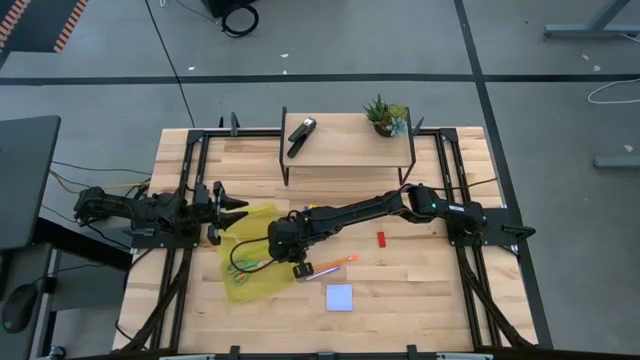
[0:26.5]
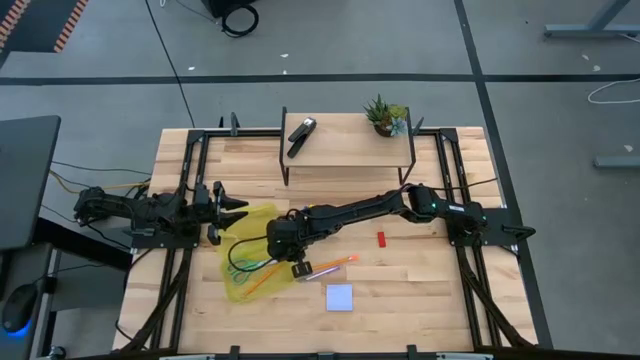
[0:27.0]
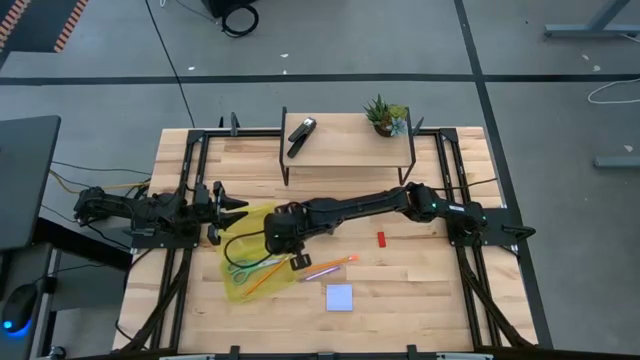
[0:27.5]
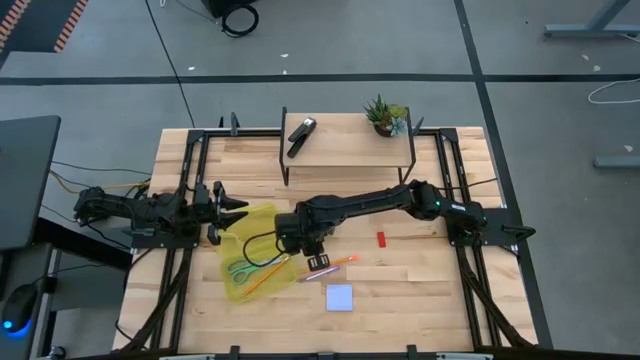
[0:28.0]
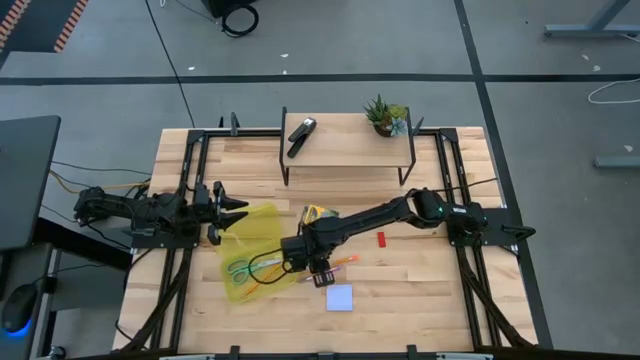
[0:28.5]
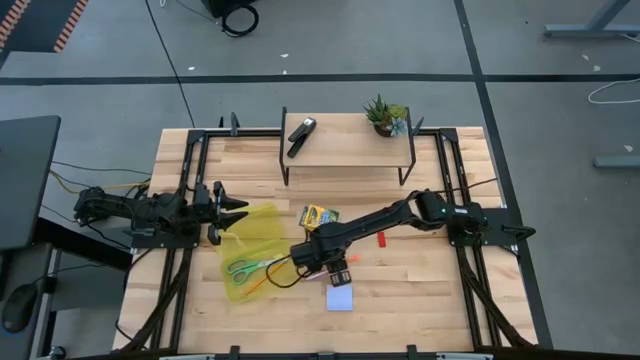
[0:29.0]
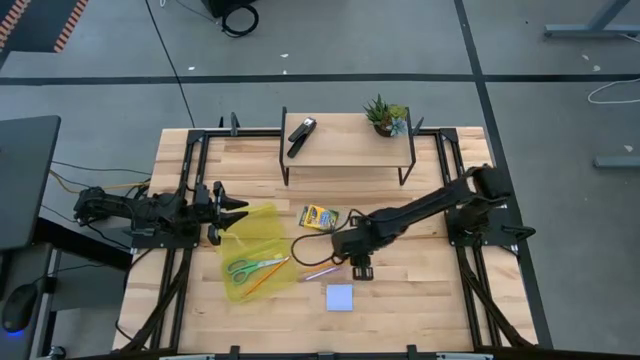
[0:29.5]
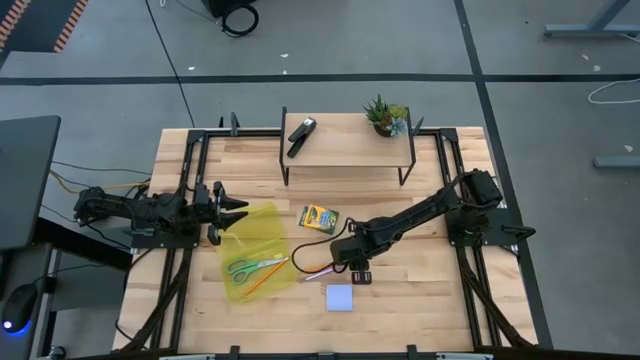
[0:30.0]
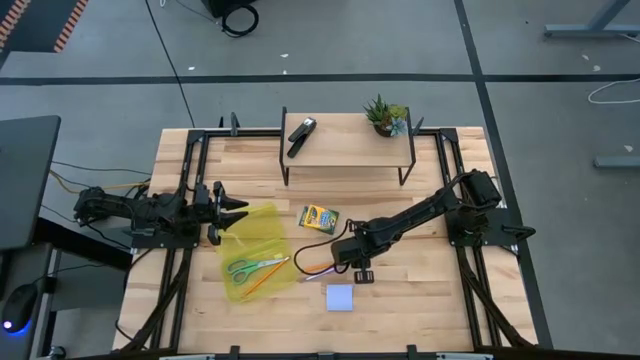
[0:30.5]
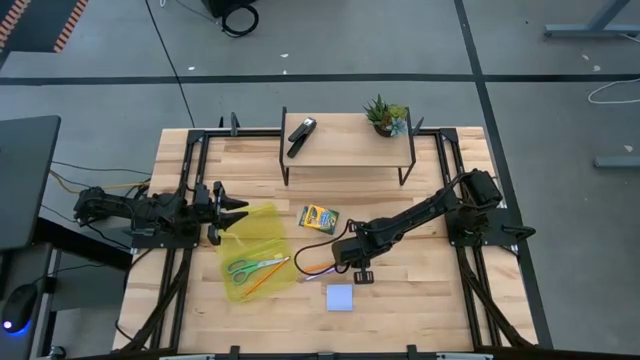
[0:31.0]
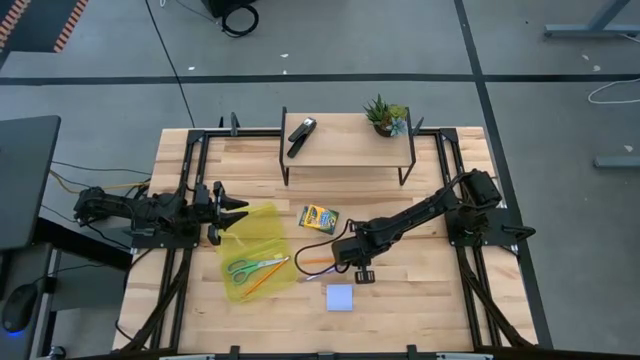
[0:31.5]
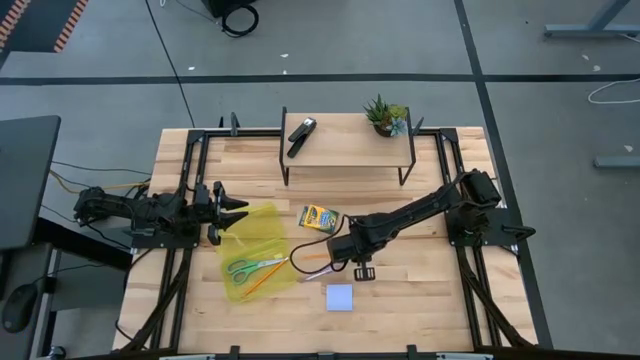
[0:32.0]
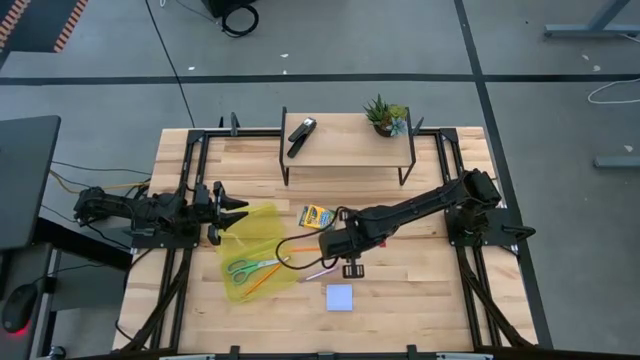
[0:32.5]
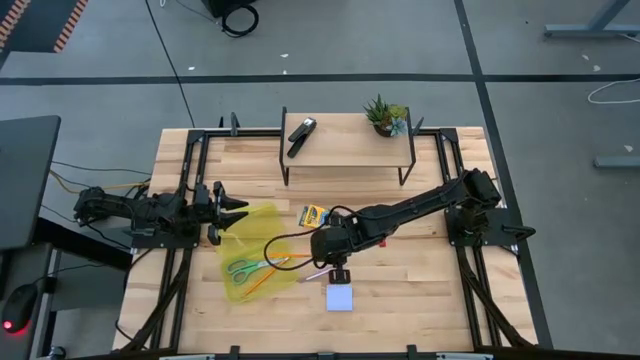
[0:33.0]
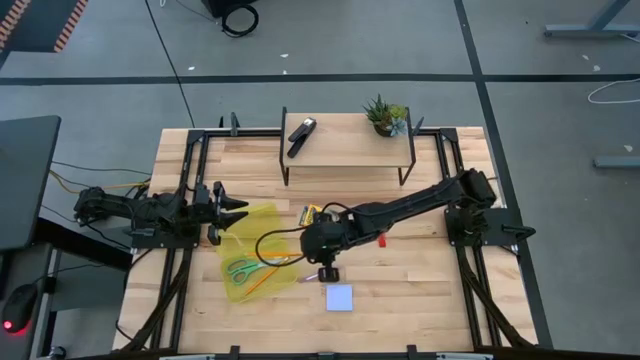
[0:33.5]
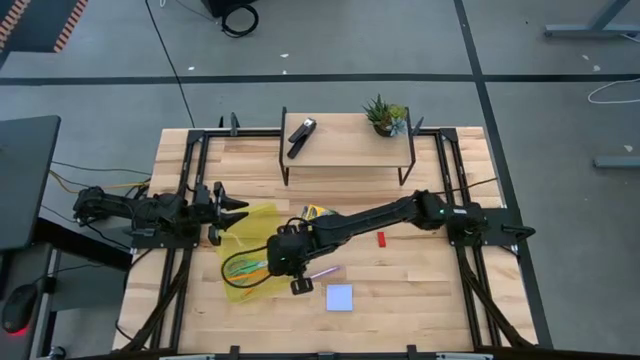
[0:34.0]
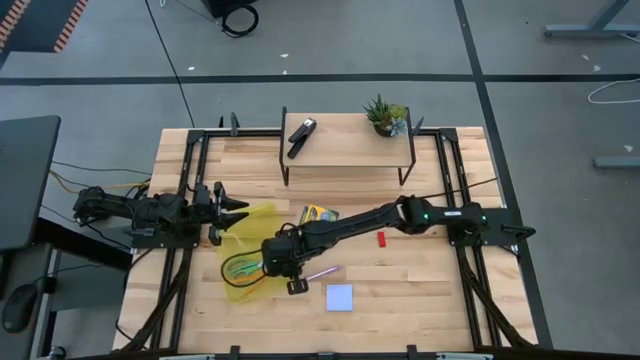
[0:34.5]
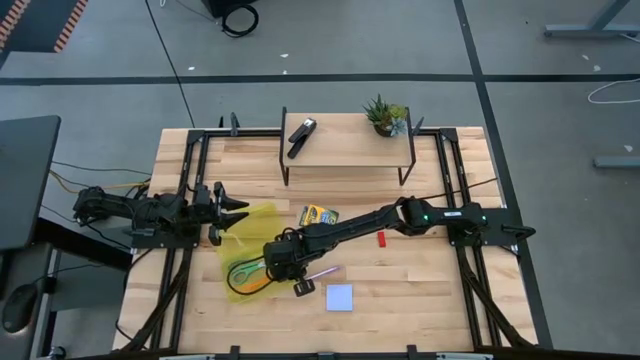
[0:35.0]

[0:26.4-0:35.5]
Task: Pack school essentials
Put the orange pencil into the yellow supply box

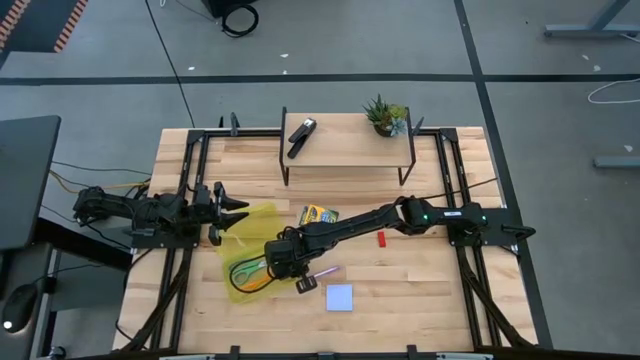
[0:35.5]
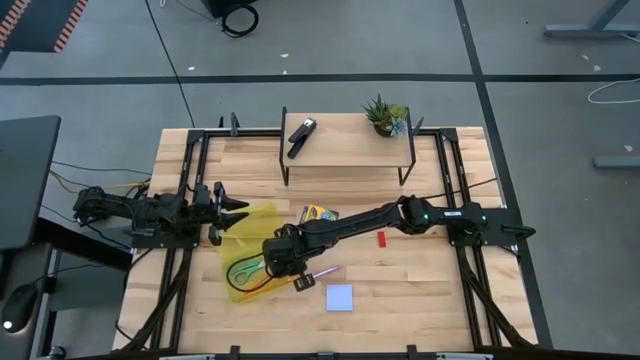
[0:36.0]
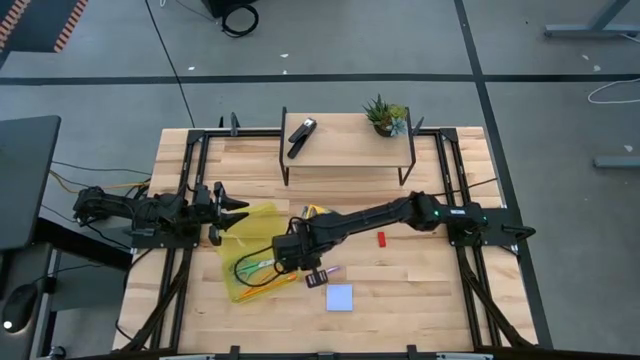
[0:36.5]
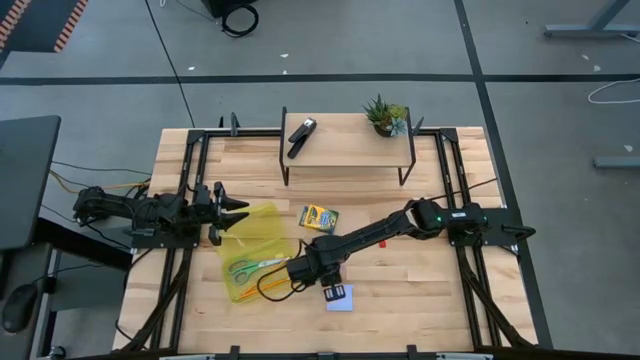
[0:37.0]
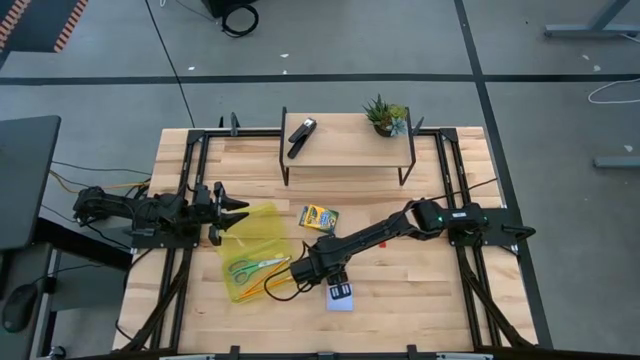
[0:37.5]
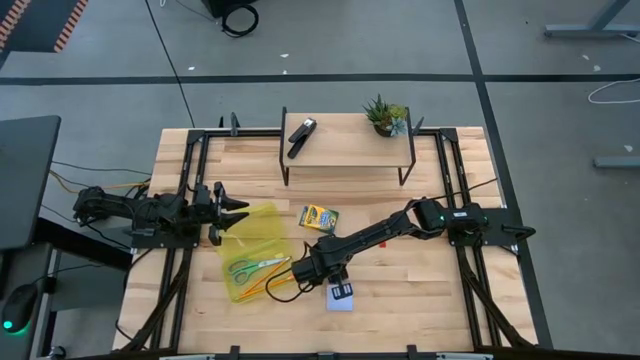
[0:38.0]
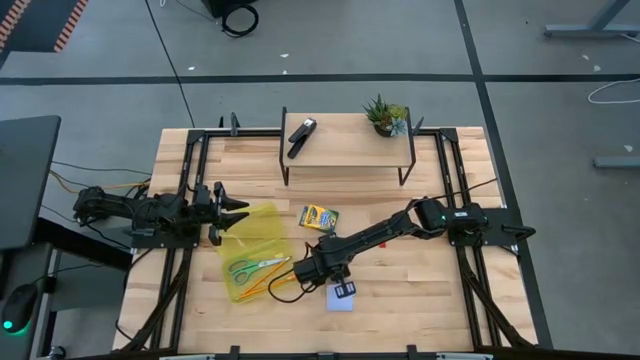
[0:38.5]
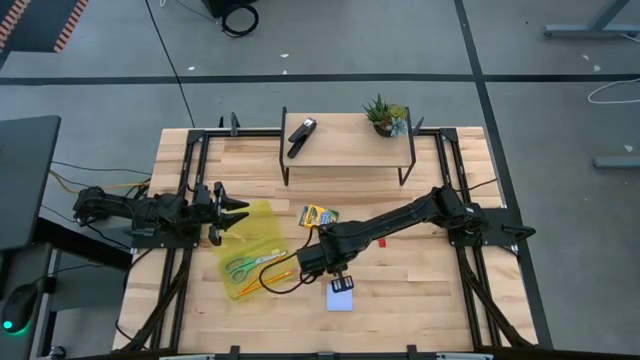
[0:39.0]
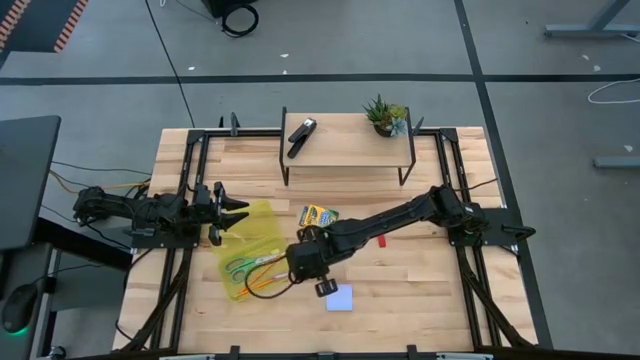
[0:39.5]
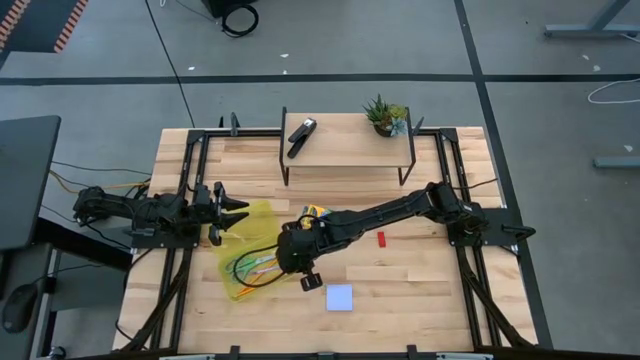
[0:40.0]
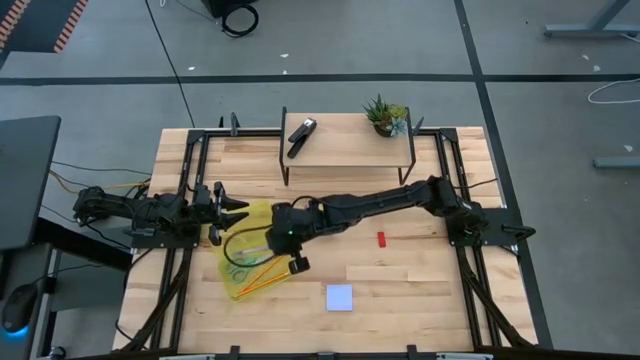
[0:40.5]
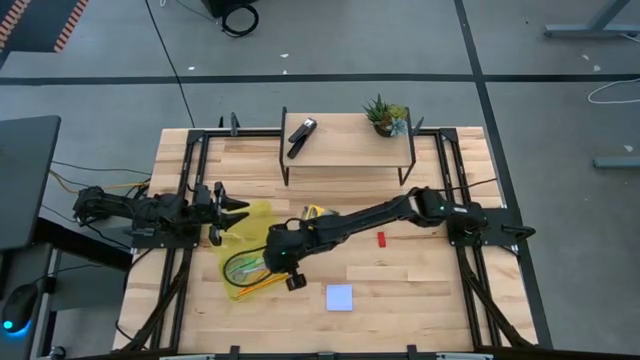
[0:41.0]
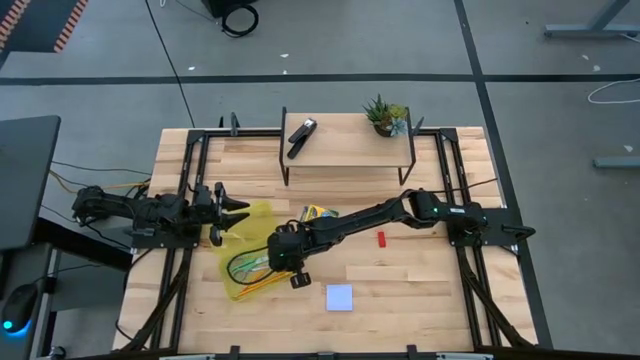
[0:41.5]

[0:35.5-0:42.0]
Put the purple pen into the yellow supply box

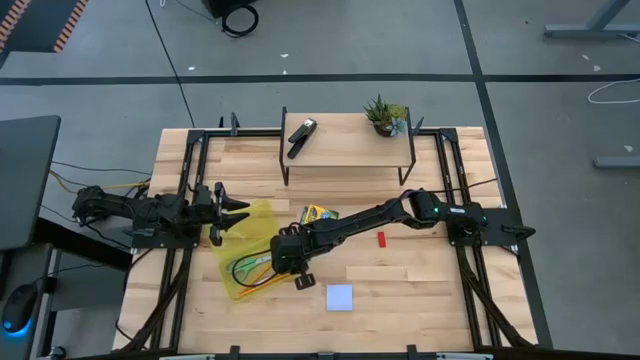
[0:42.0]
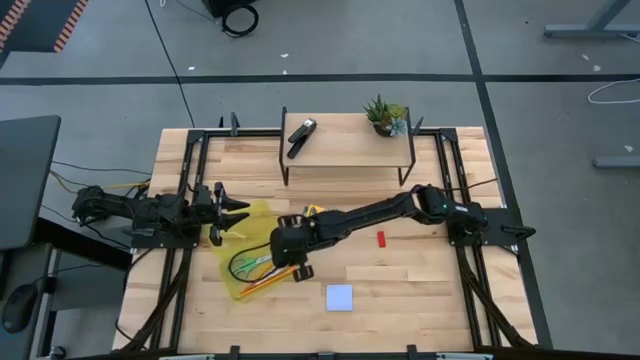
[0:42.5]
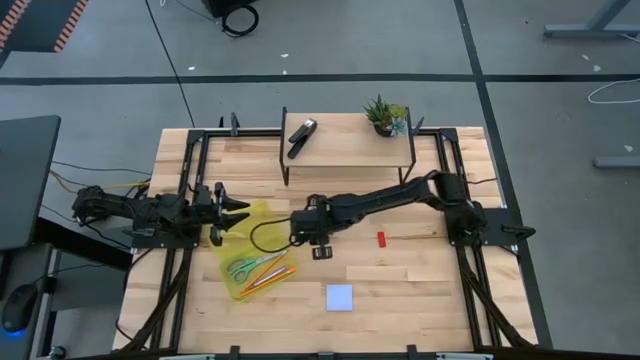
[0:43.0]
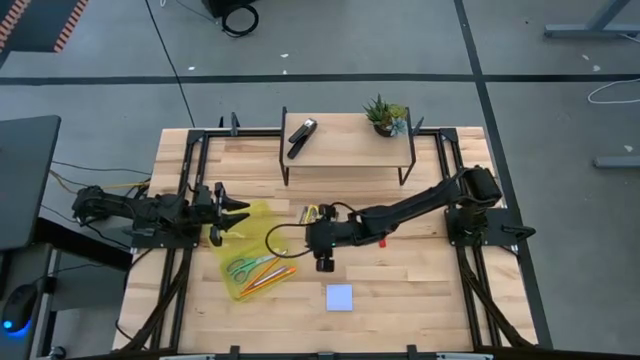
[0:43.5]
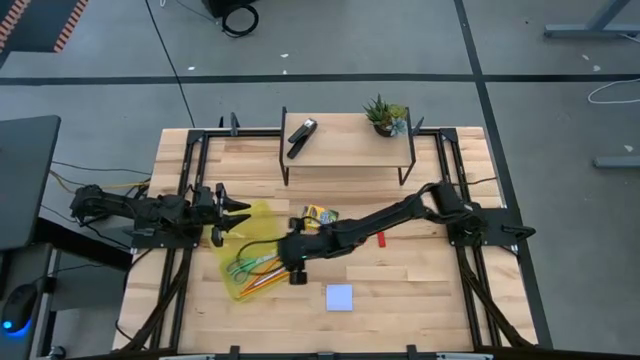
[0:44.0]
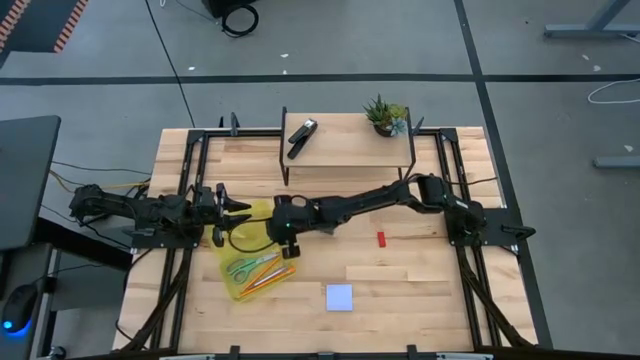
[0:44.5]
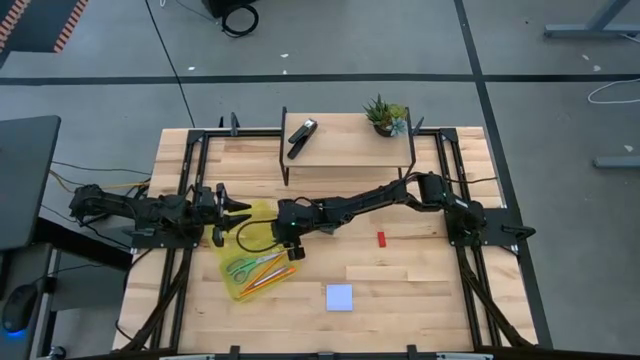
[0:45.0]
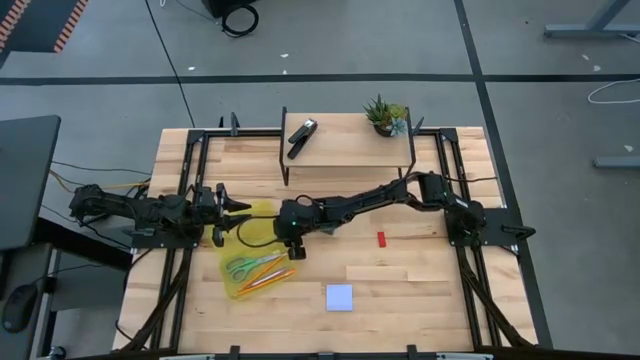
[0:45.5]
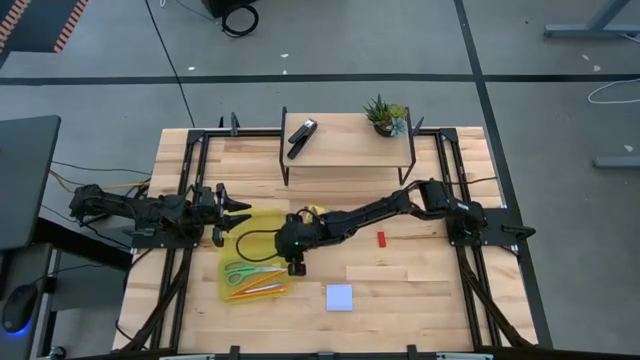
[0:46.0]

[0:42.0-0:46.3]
Adjust the yellow supply box

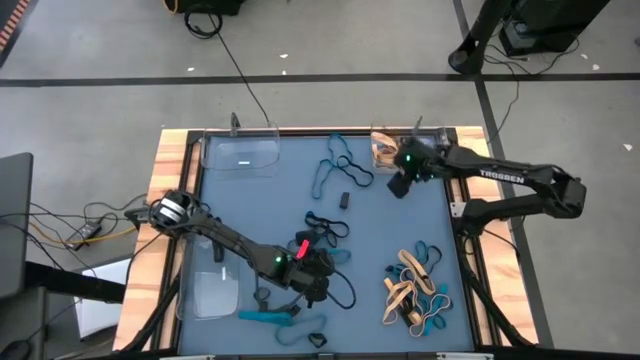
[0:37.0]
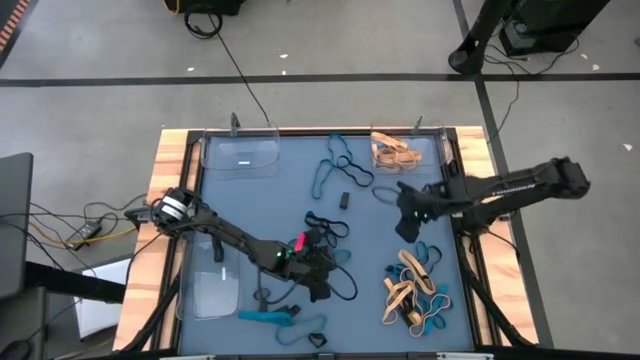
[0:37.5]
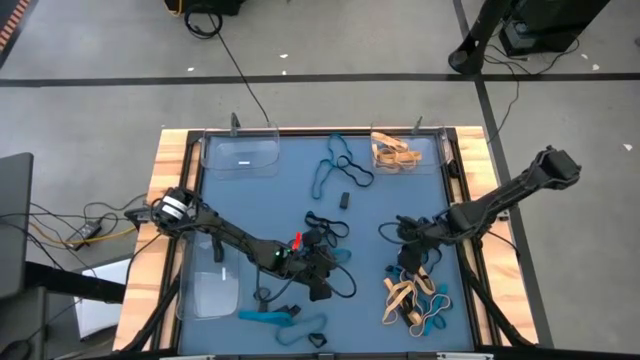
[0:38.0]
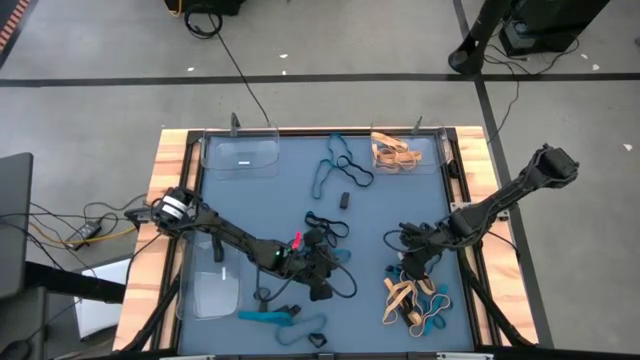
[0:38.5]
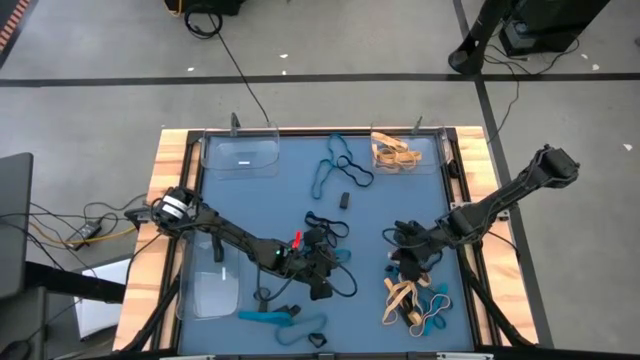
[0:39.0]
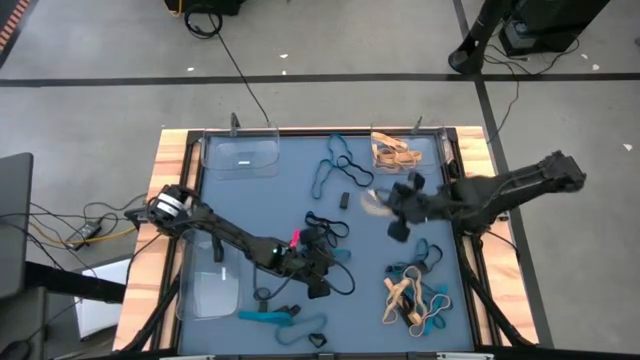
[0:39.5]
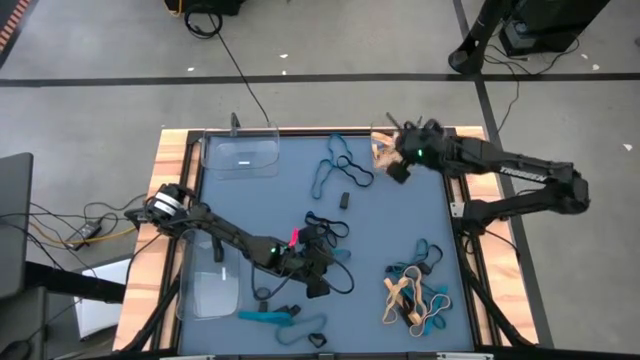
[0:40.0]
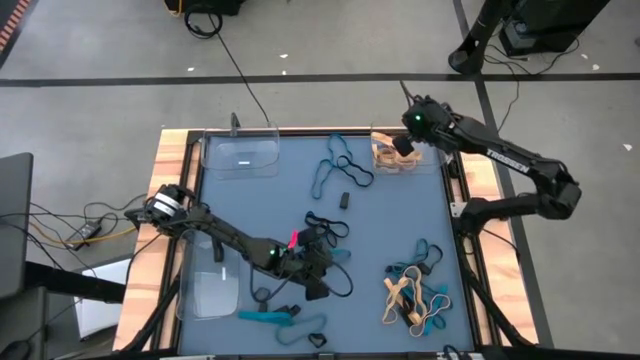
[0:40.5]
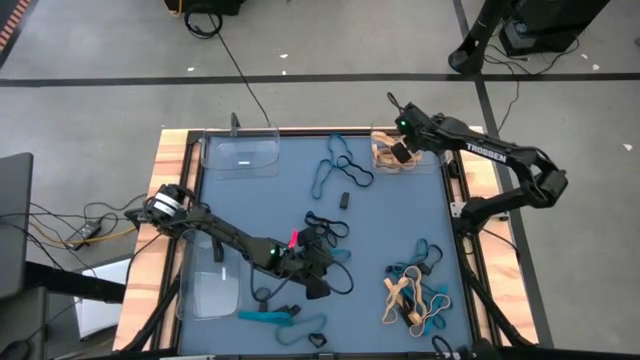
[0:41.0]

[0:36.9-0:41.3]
Task: Sort rubber bands into baskets
Put the yellow rubber band into the top right transparent bin
